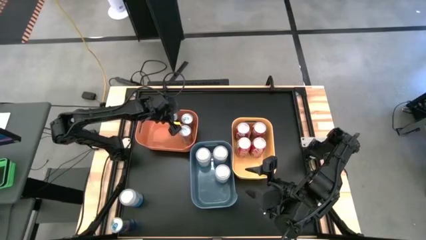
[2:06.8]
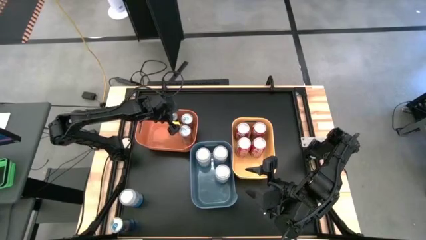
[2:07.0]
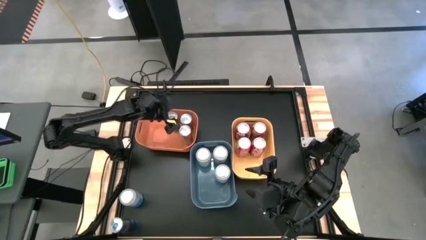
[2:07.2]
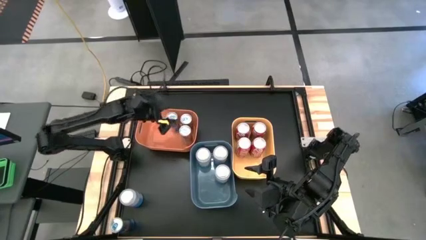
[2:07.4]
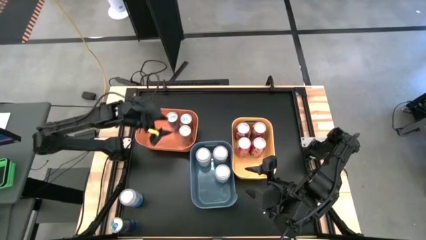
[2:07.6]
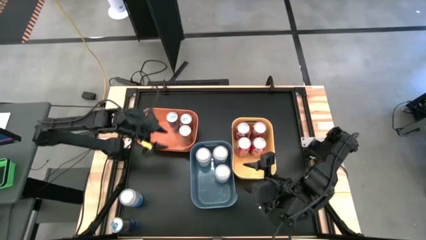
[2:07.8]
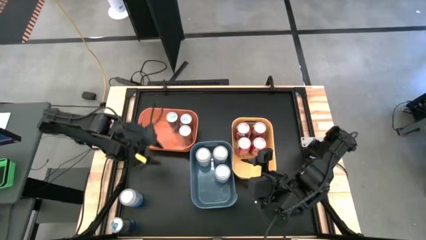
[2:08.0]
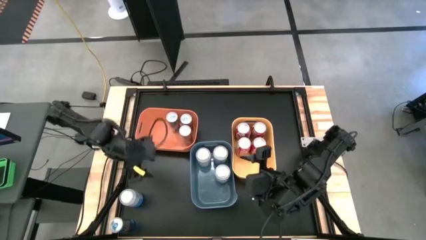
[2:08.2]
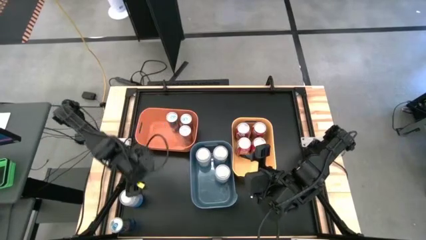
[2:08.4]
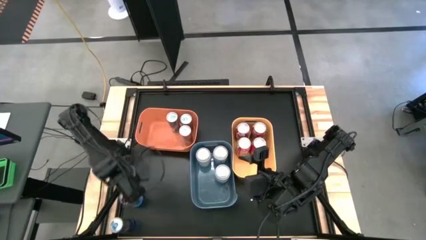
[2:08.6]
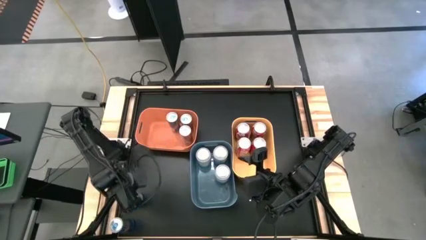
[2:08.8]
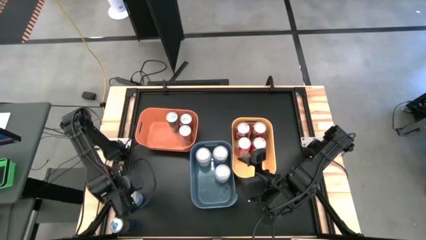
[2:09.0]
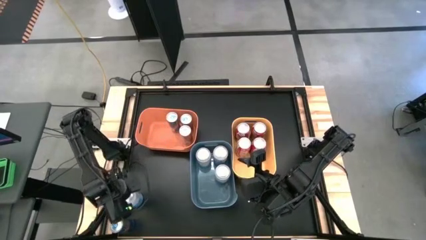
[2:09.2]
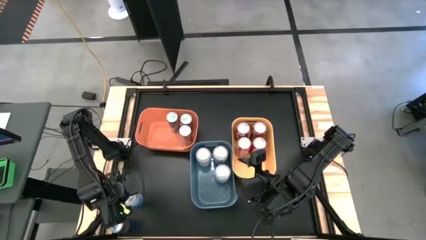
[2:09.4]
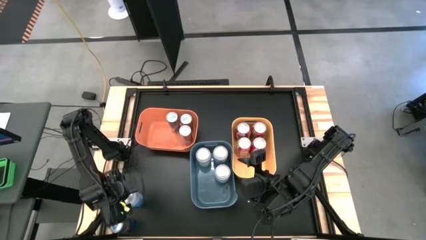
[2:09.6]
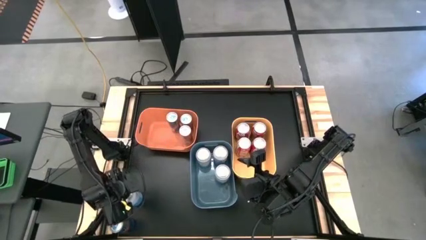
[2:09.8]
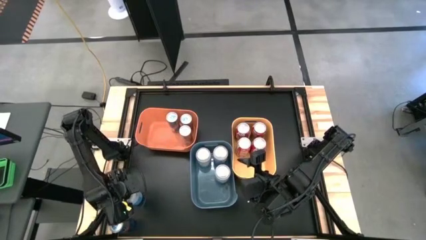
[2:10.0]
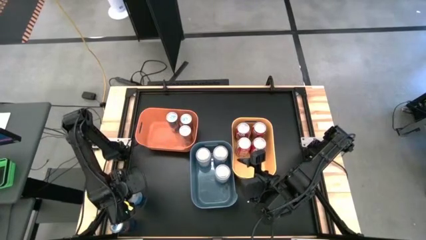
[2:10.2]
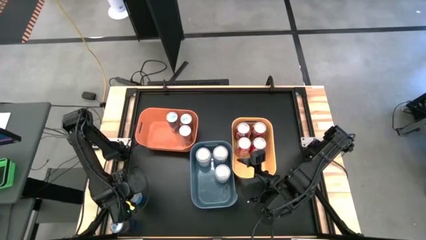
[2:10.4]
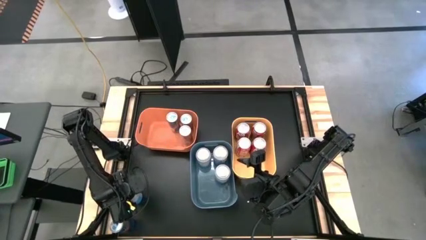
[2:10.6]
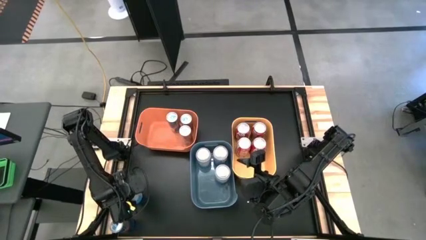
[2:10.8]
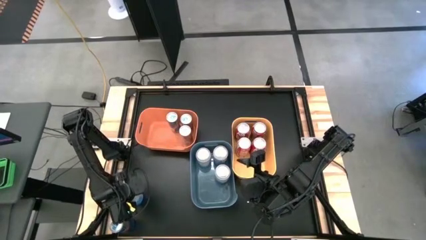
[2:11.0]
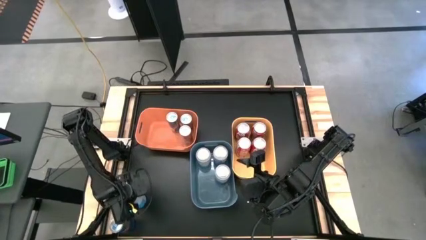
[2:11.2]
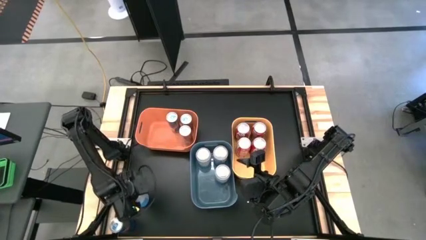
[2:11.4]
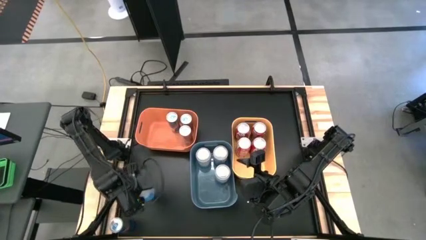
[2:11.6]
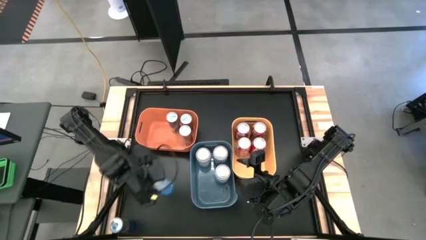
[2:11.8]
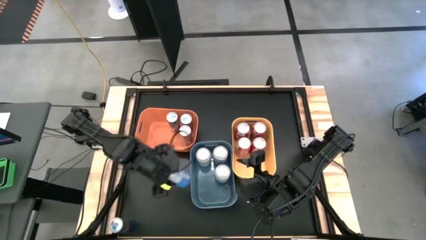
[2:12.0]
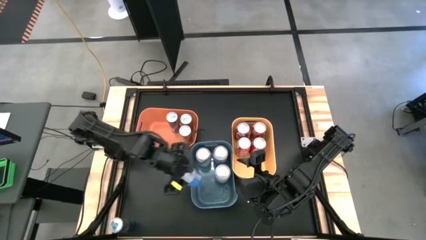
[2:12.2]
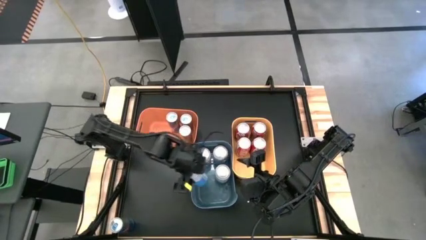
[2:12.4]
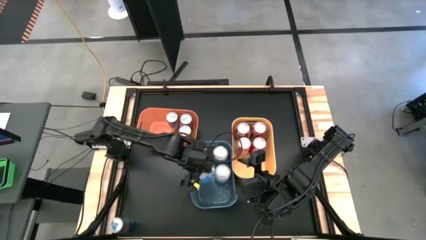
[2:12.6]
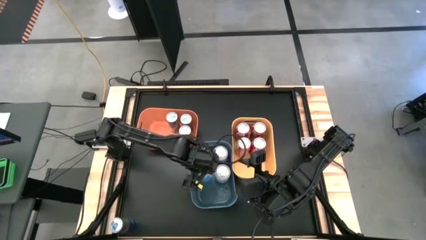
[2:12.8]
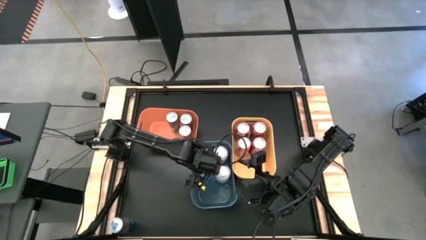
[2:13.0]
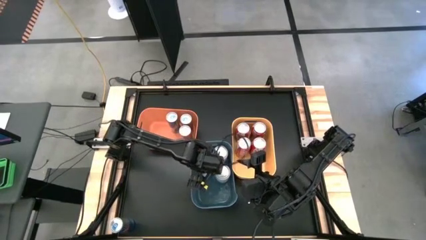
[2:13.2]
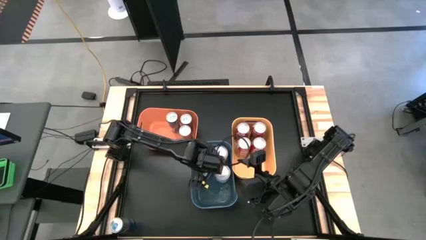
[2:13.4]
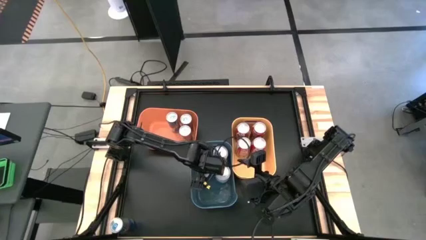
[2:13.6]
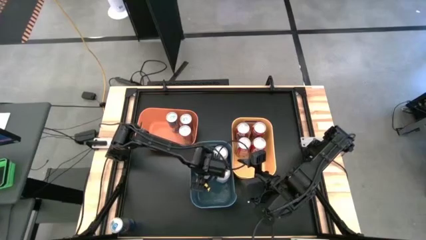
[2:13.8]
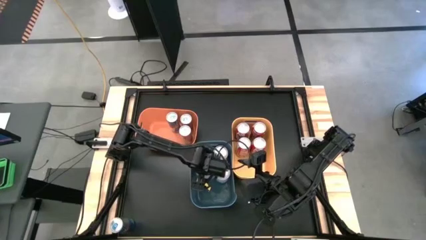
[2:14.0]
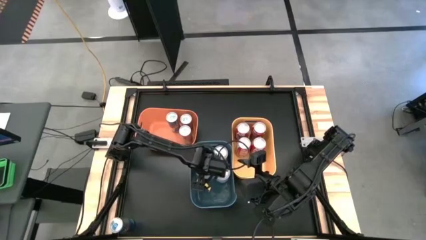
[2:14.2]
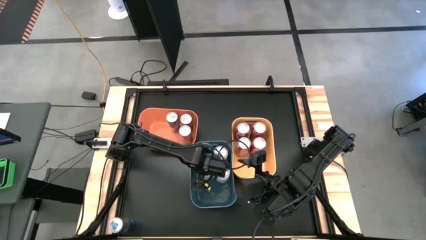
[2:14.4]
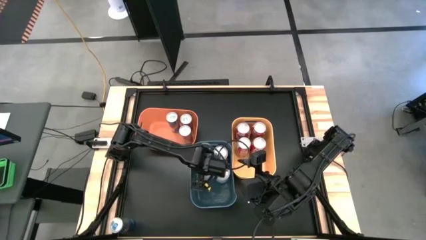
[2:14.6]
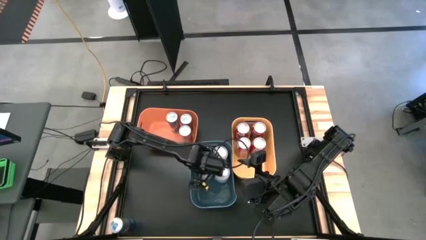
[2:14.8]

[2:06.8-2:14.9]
Task: Sort soda cans
Put the blue-white soda can into the blue bin

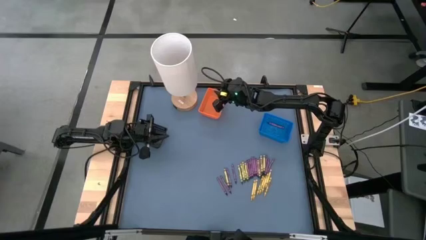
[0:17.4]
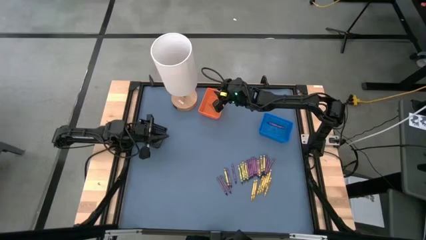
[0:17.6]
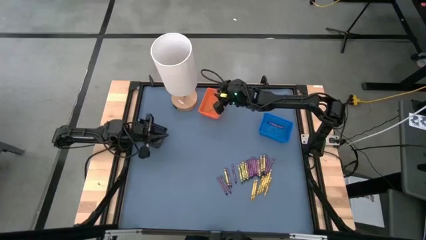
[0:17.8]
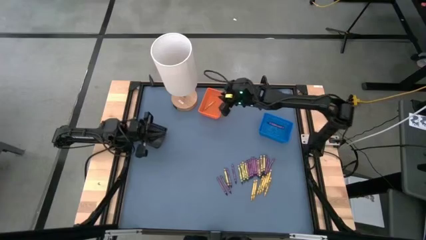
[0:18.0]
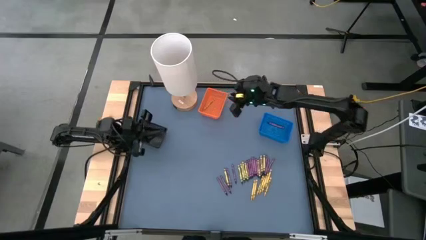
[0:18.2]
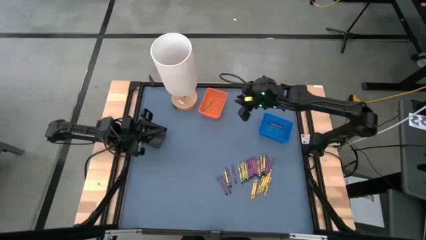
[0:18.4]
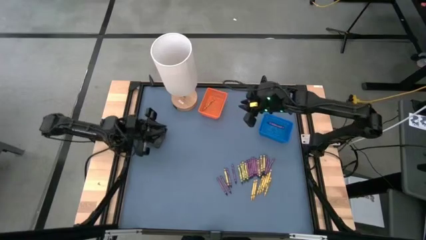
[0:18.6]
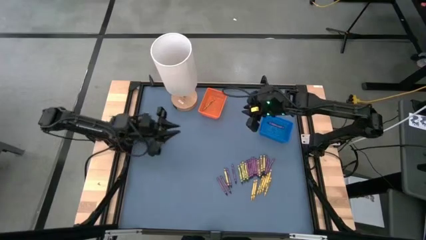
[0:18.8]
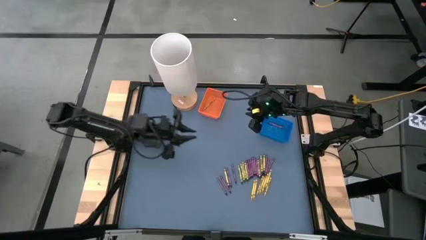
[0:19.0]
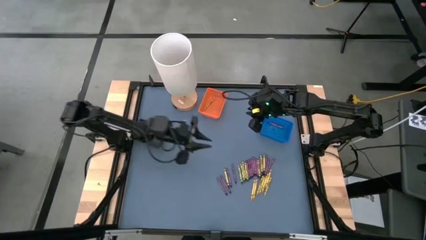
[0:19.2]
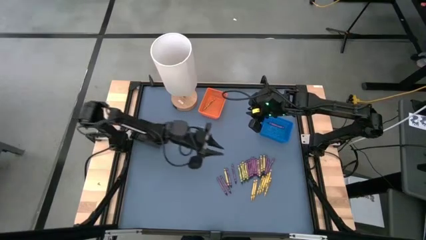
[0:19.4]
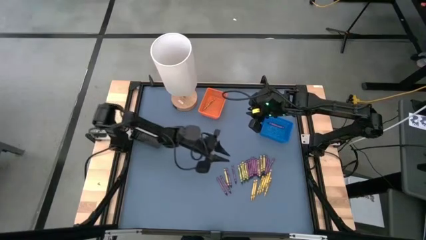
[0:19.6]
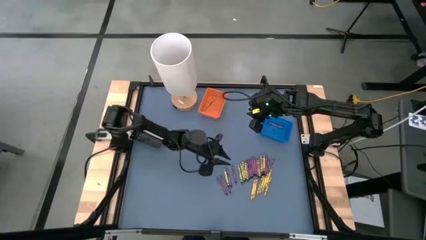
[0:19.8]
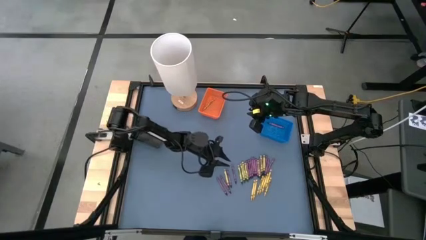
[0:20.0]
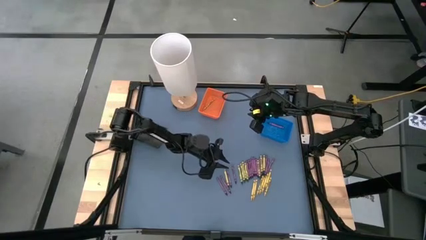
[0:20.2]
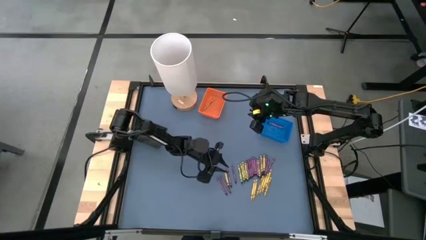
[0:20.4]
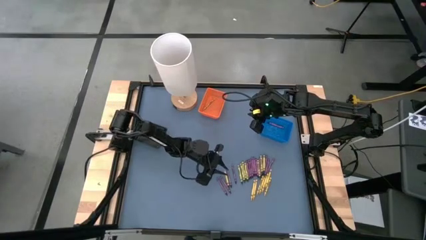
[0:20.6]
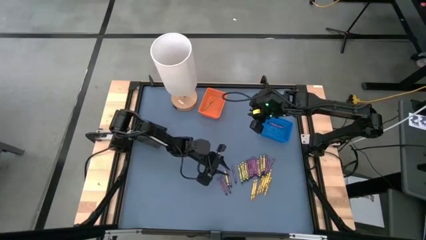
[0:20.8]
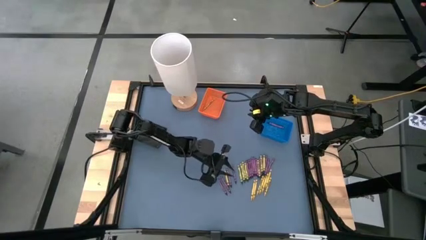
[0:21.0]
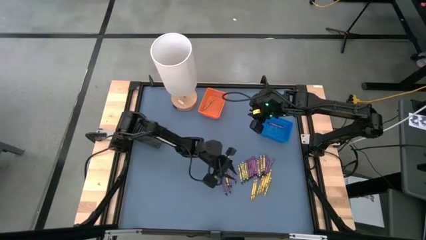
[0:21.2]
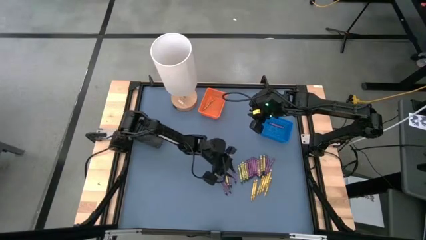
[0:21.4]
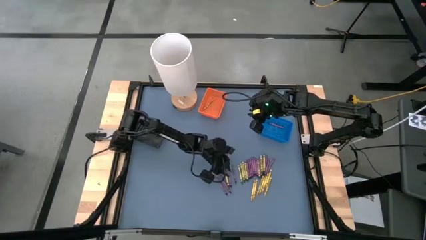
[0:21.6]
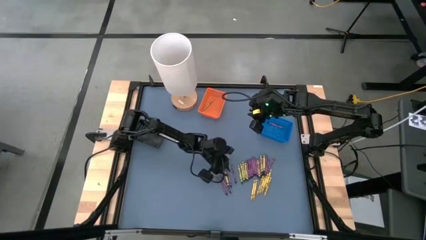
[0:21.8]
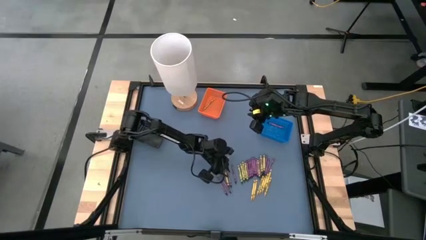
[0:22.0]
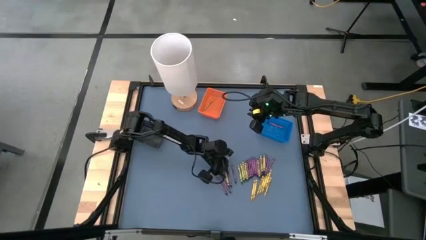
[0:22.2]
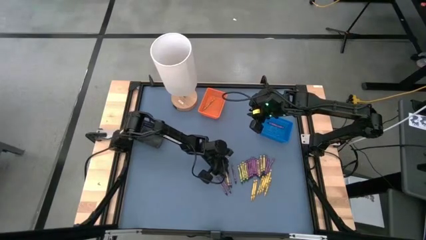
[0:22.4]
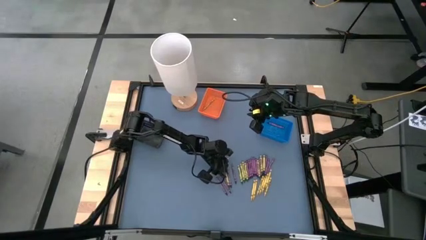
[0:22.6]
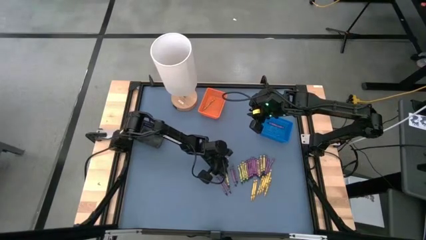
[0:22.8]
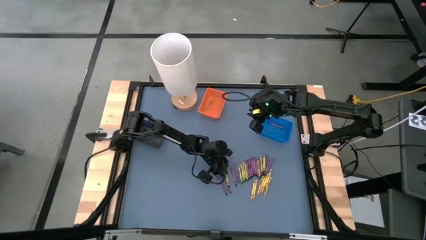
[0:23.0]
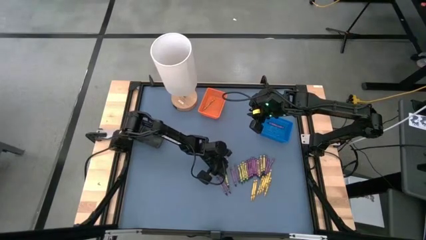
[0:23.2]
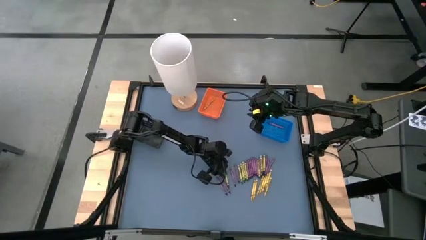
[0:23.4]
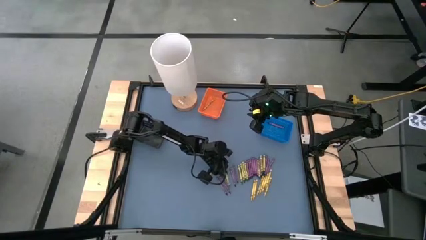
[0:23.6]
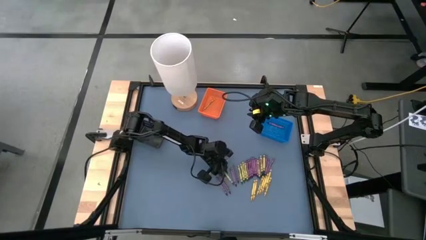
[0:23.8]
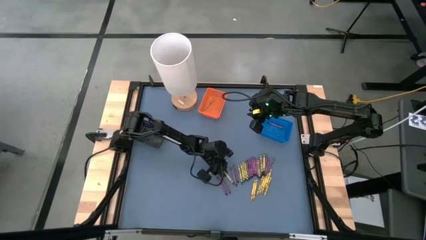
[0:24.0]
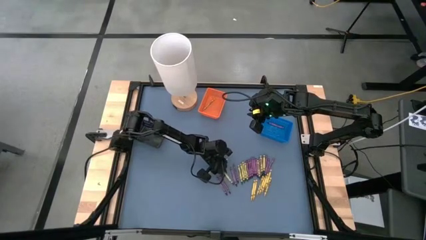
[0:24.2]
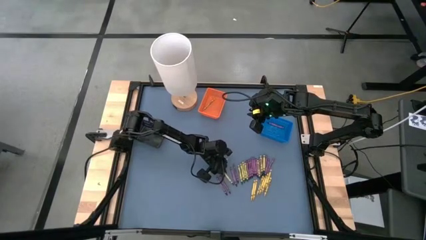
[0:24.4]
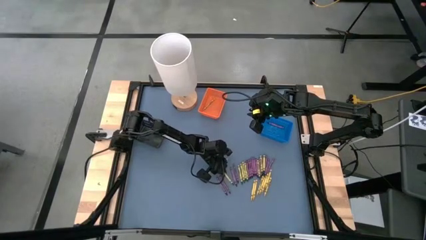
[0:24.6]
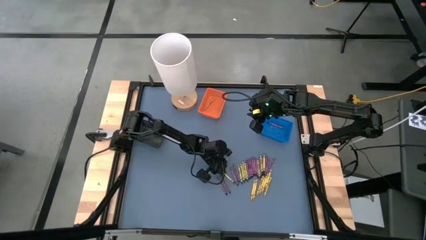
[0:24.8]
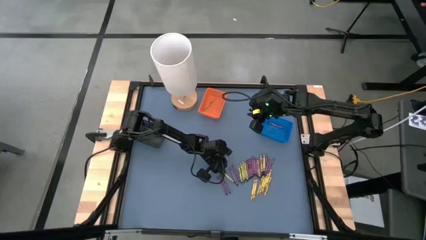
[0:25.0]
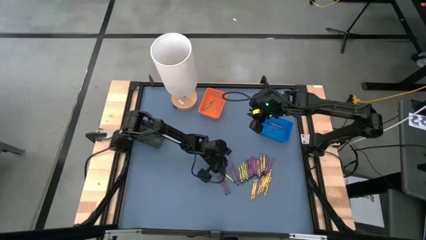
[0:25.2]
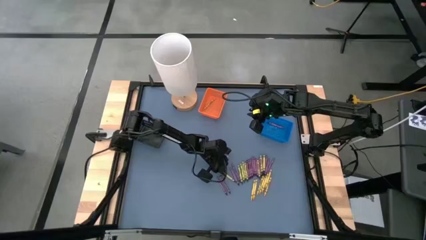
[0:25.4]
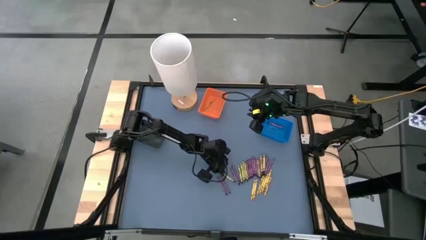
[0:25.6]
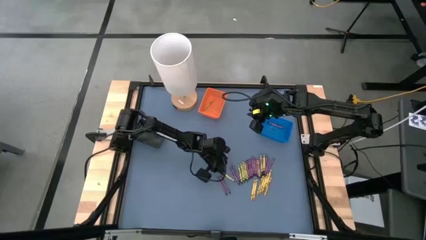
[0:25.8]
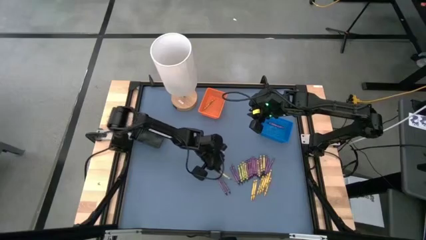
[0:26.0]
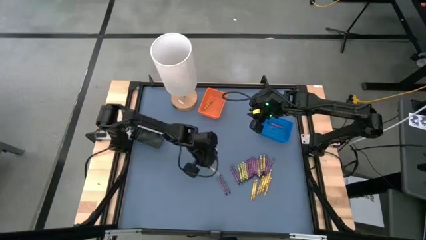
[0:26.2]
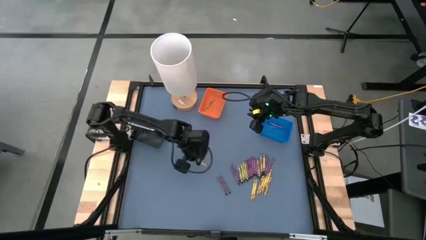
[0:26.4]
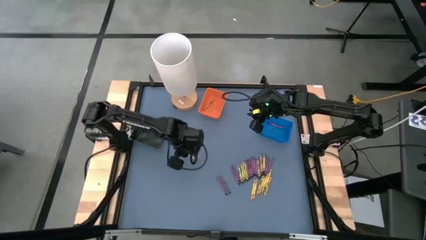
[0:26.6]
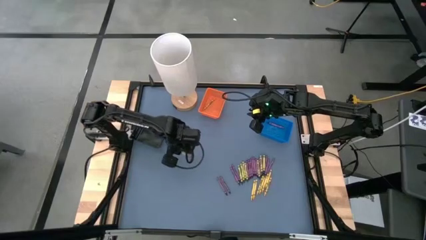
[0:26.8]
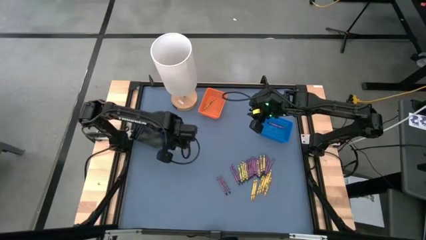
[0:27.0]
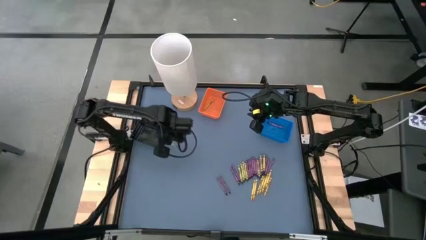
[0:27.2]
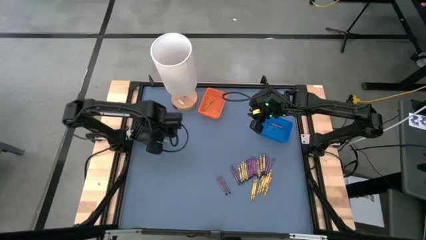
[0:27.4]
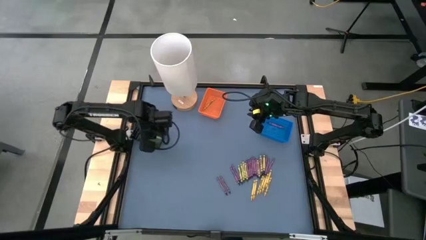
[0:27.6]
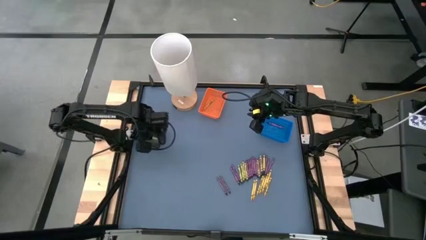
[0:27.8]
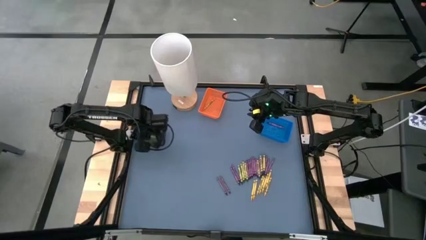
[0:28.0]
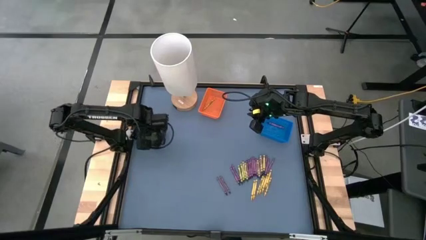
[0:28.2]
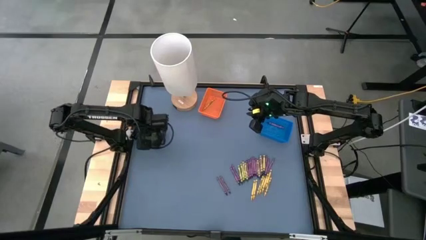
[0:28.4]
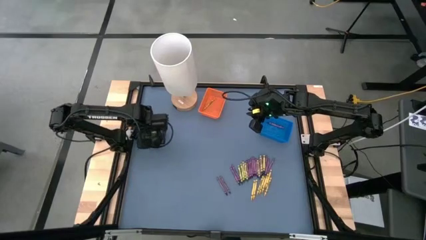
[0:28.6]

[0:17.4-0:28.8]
Task: Sort crayons
Put the green crayon into the black basket
